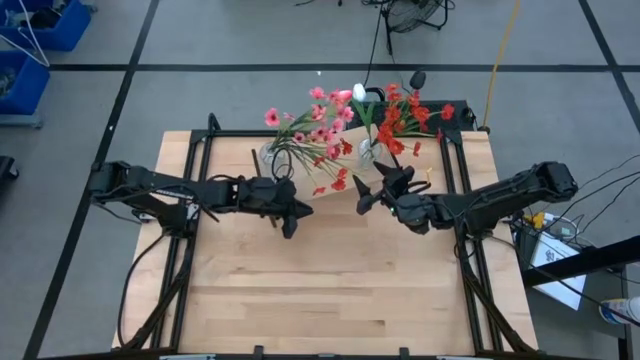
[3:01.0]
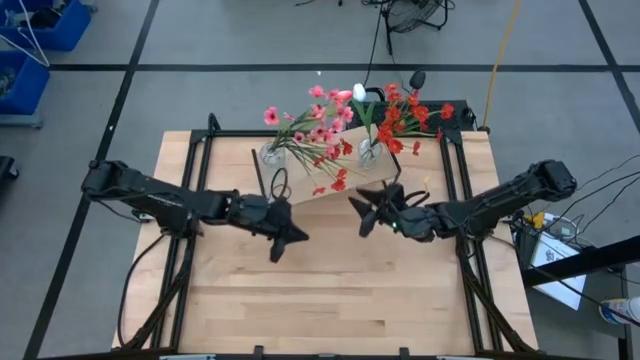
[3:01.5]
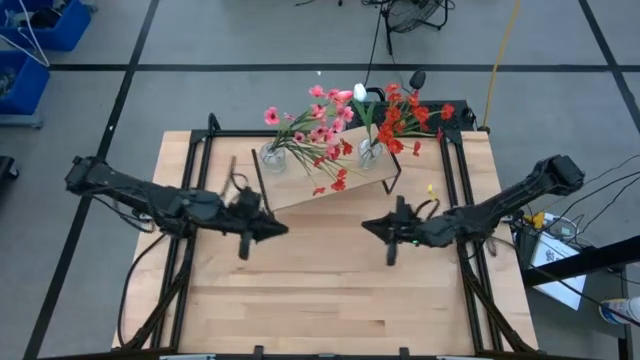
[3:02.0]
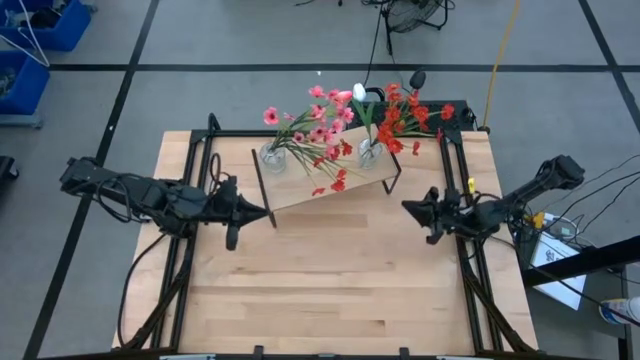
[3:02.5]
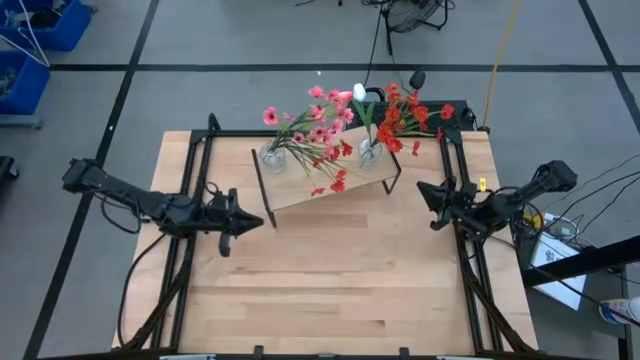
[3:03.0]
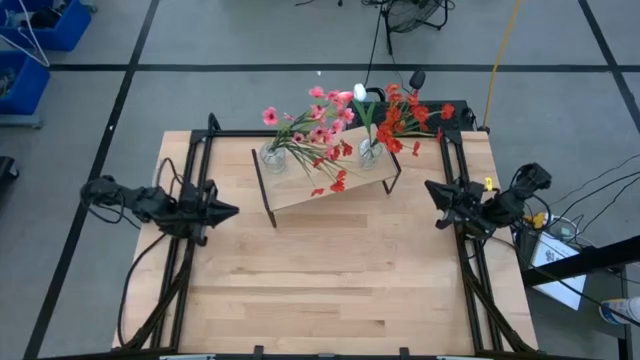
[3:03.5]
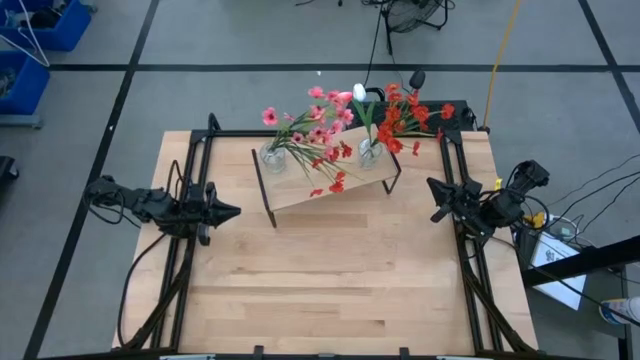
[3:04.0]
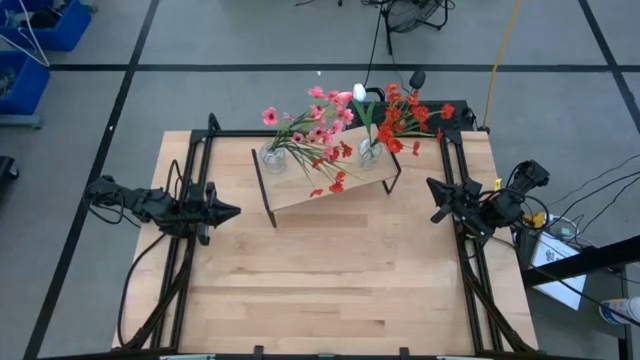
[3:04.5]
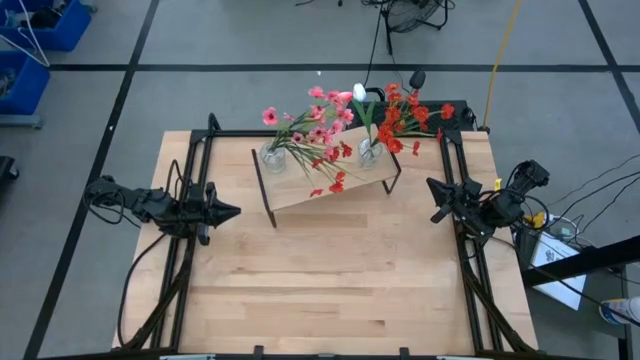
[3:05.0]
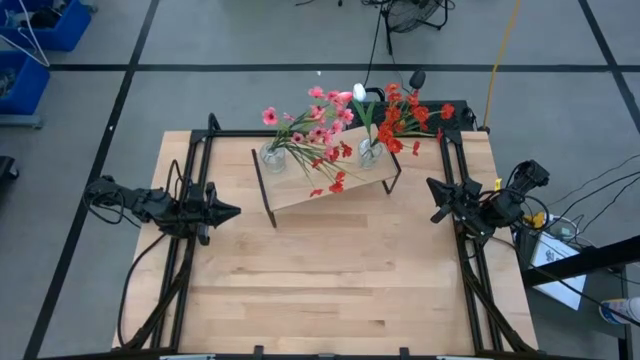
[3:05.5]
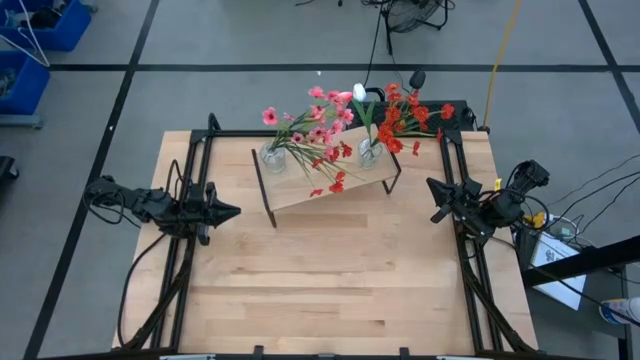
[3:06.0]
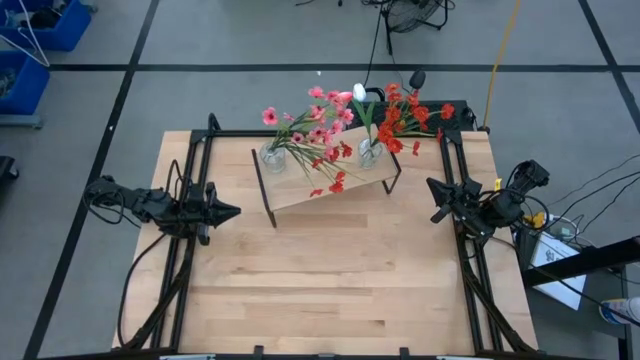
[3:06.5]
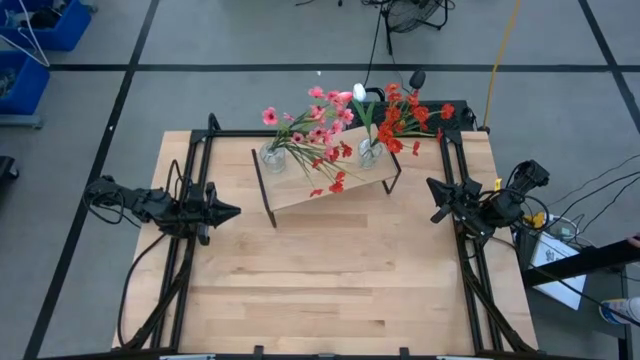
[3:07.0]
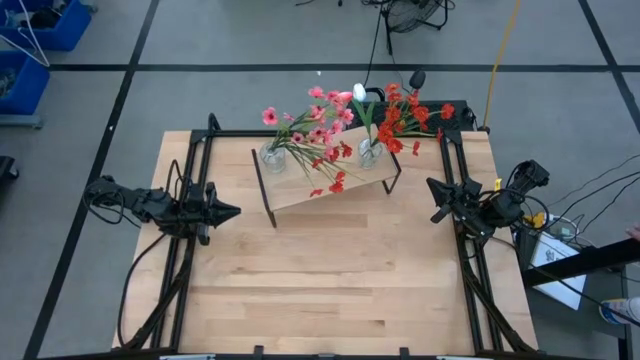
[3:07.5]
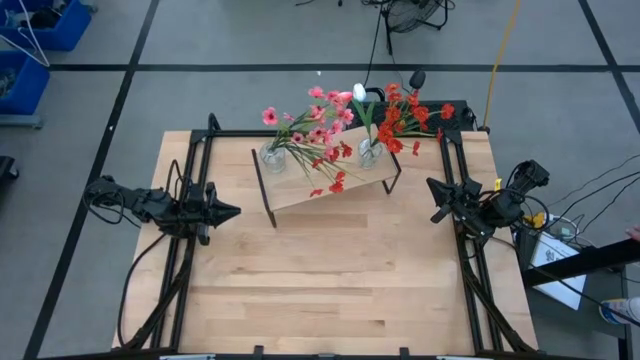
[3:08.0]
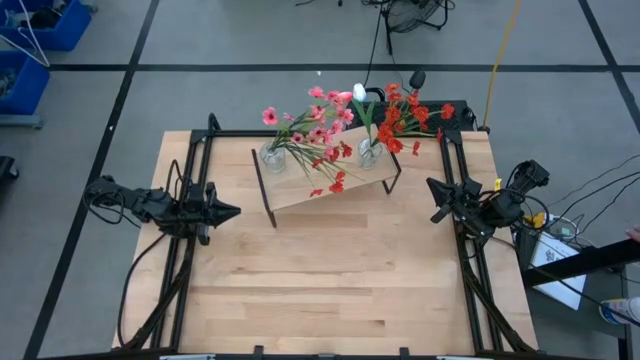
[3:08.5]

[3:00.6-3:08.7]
Task: Pick and place flowers into a vace then onto a shelf
Return to Home Position

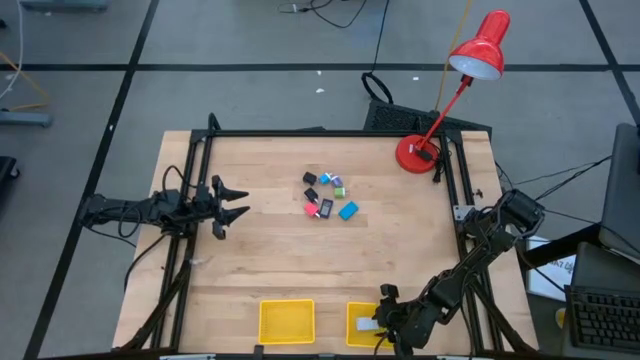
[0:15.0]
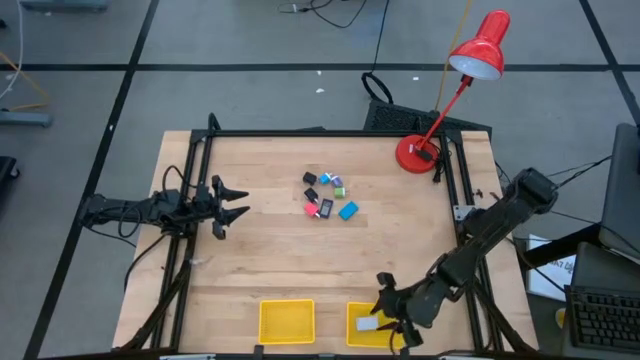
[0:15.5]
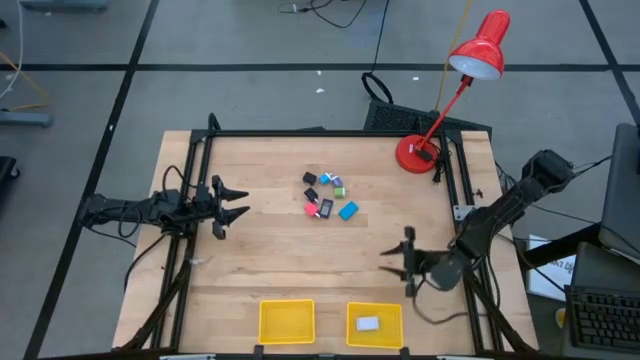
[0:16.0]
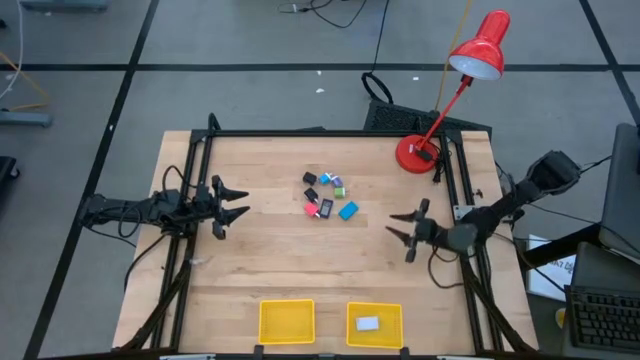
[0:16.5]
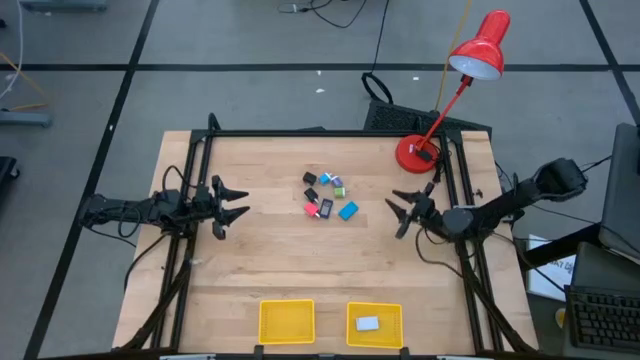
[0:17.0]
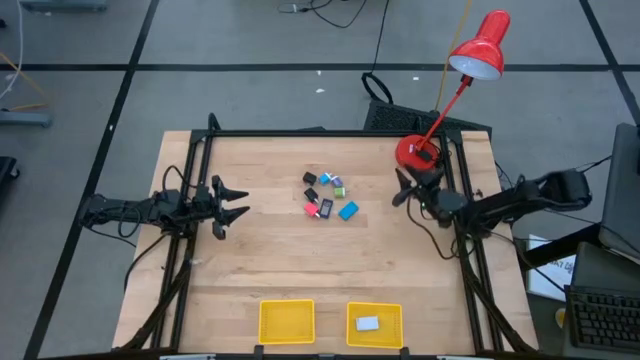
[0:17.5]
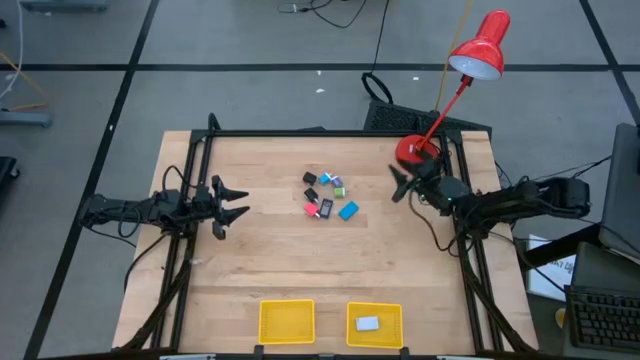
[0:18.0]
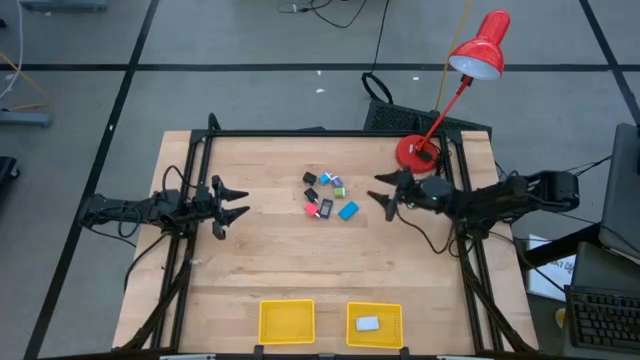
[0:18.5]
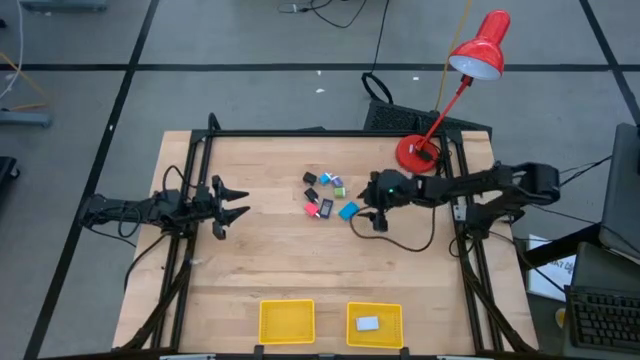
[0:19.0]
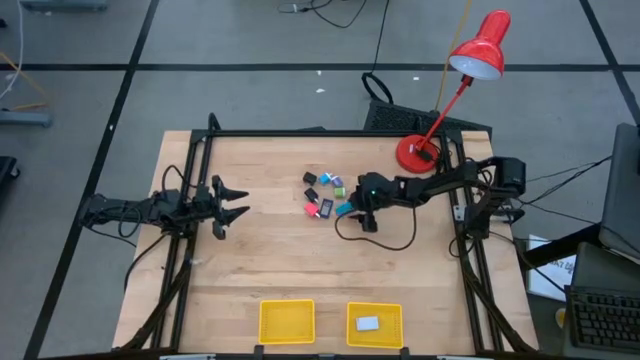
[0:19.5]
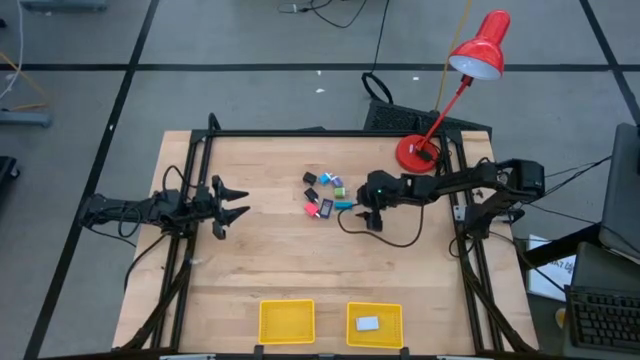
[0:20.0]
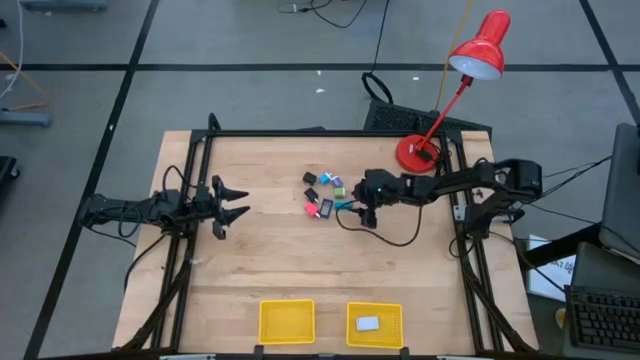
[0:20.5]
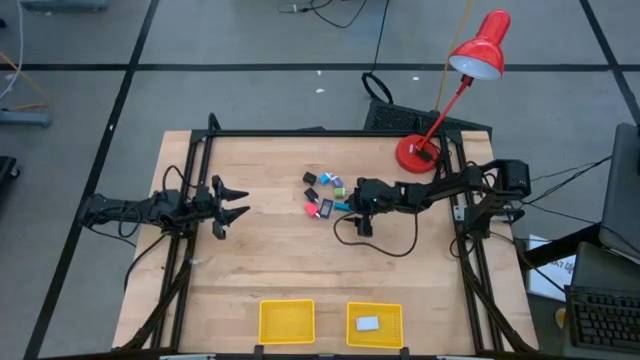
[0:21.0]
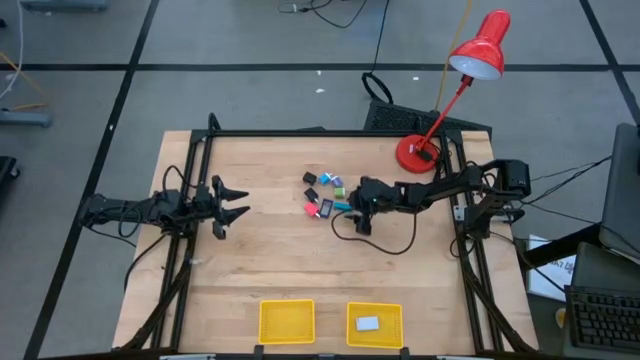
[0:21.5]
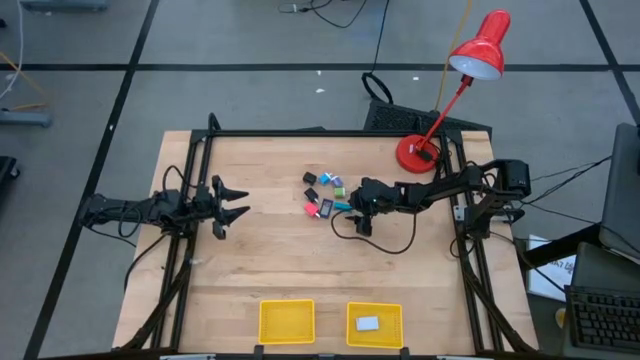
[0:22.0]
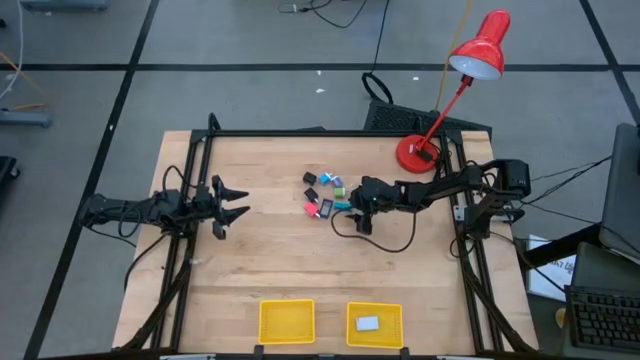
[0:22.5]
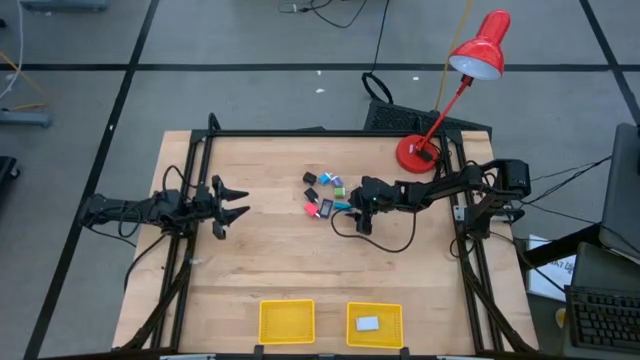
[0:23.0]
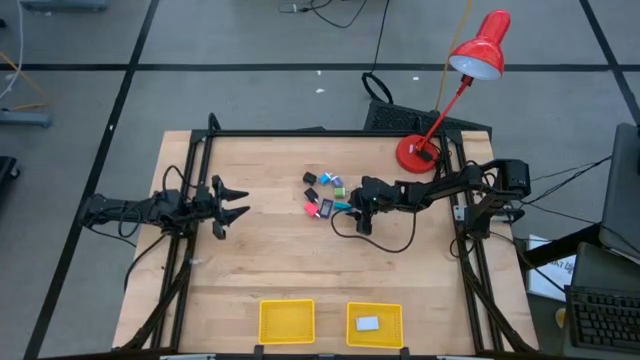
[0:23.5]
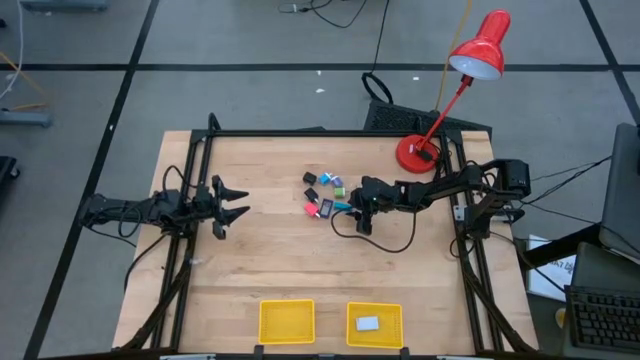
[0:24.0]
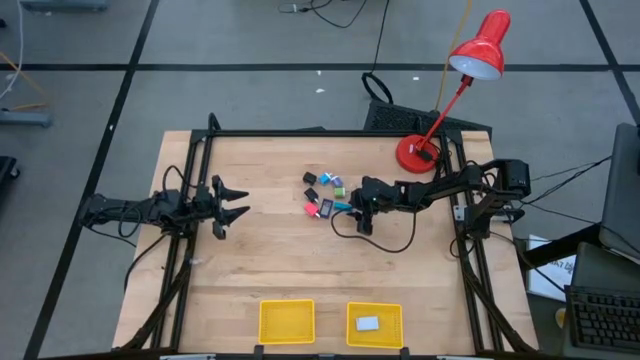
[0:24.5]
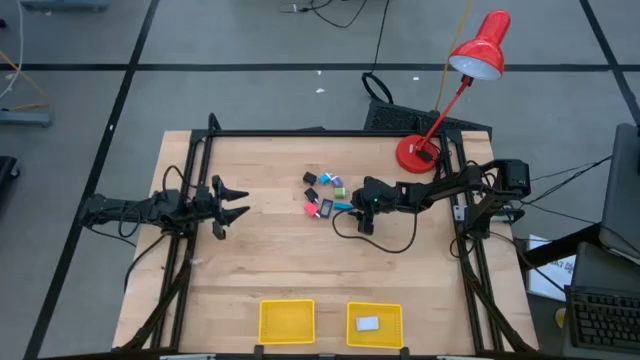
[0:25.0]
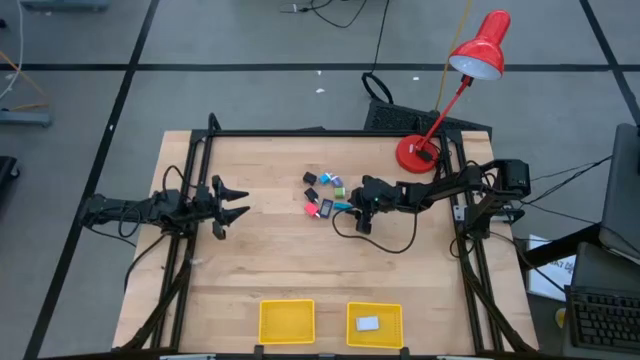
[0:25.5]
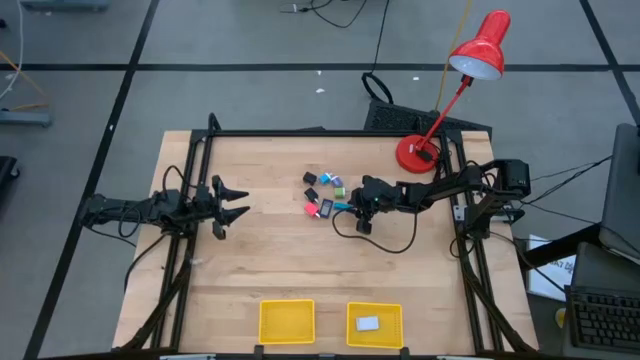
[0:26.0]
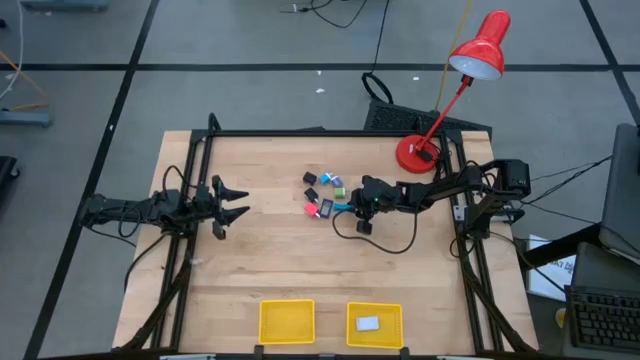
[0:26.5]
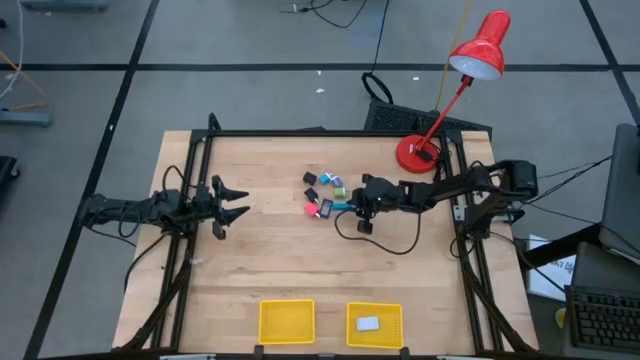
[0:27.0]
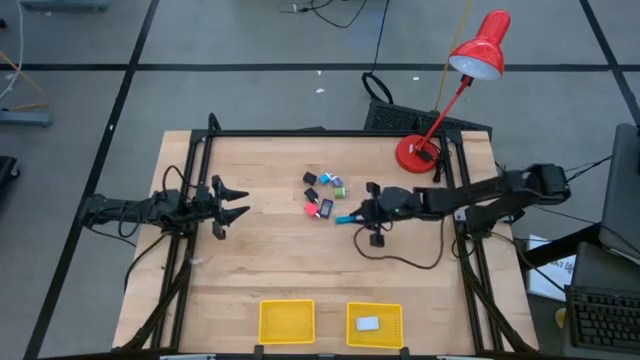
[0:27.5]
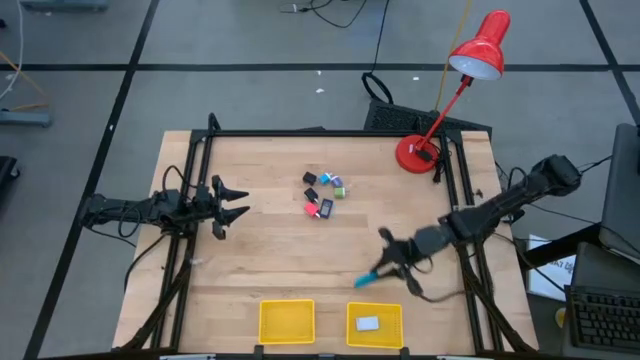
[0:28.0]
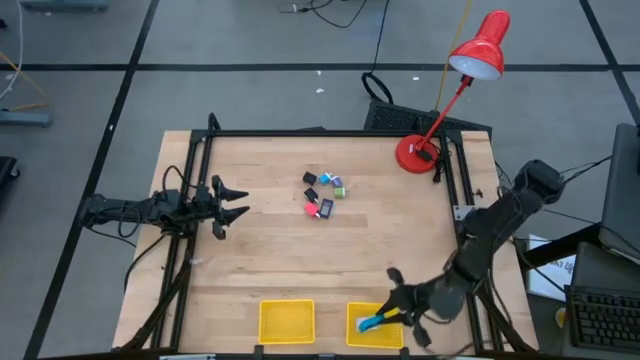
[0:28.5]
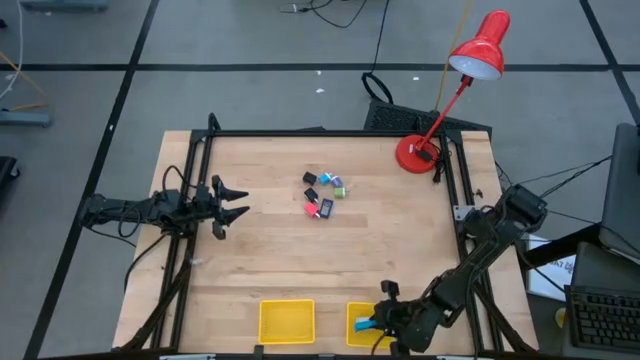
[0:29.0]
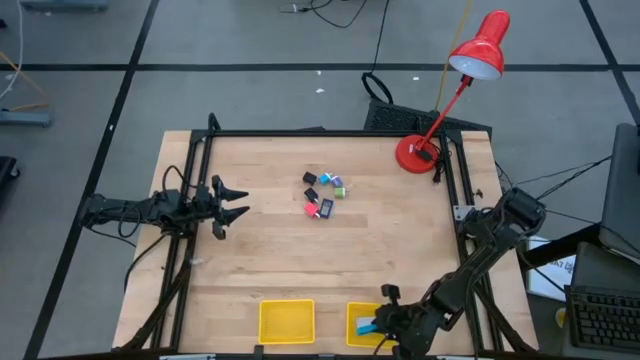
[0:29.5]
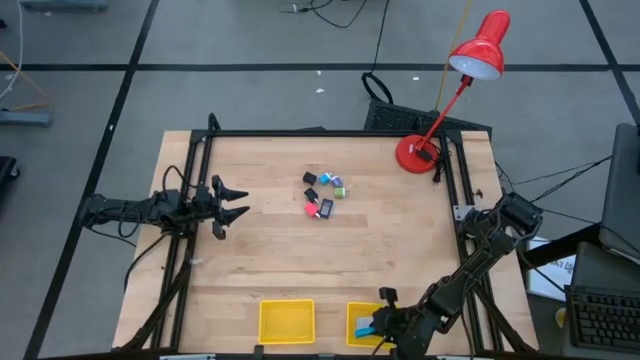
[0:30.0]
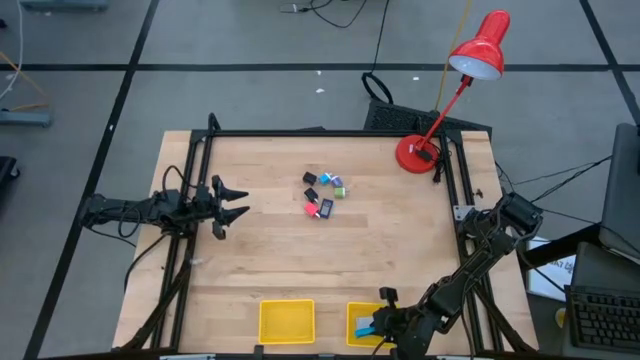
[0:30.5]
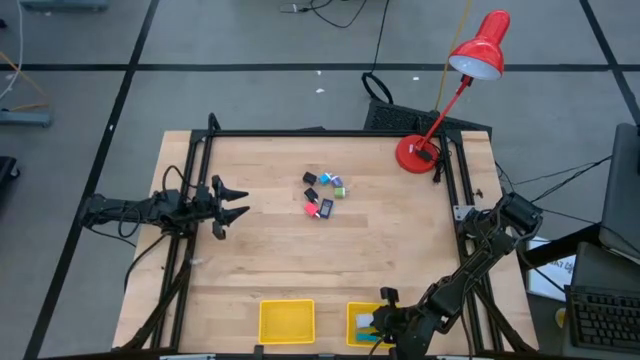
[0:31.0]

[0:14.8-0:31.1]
Task: Pick & Place Office items
Put the blue digital clock into the right yellow bin
